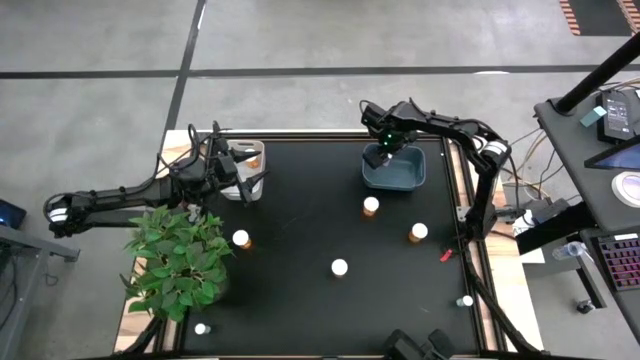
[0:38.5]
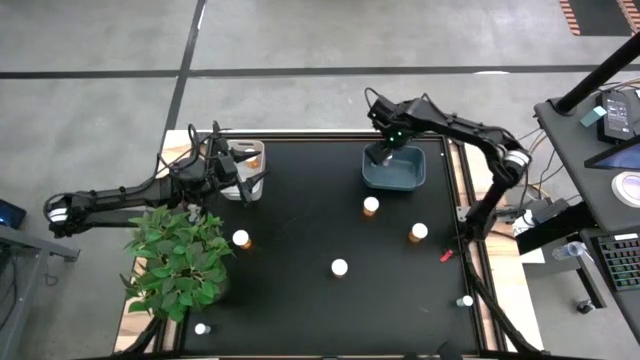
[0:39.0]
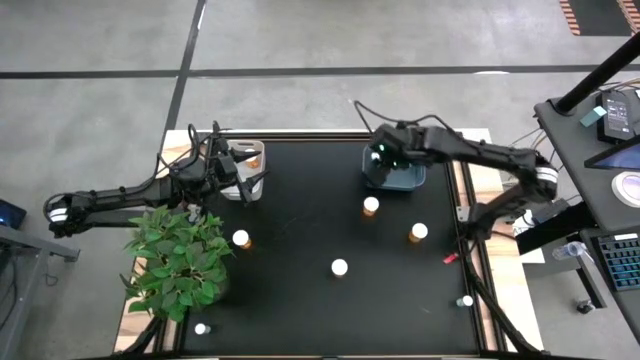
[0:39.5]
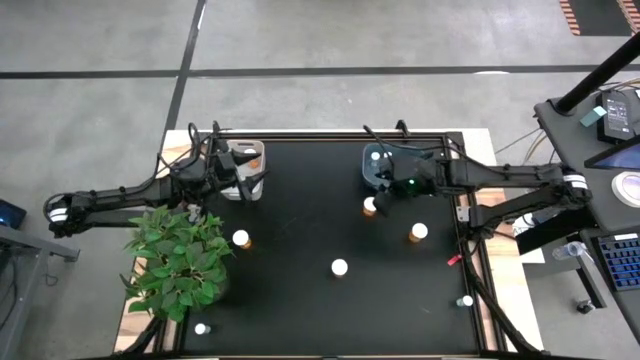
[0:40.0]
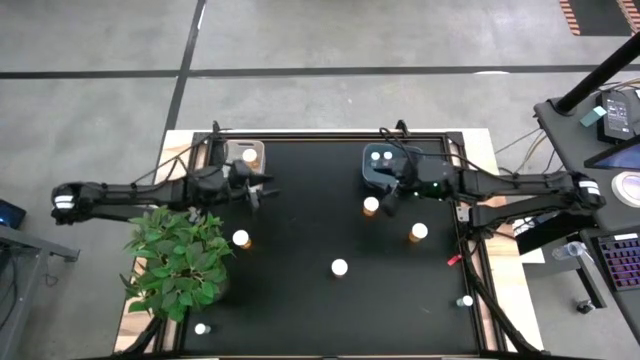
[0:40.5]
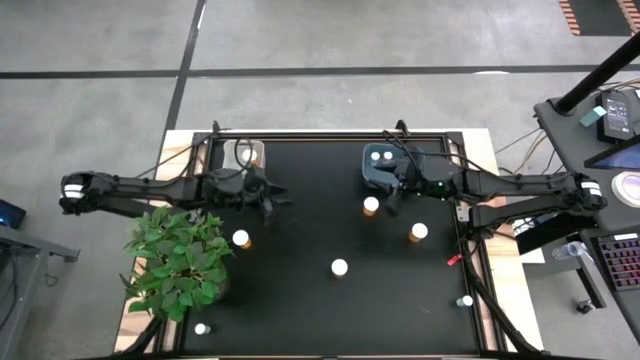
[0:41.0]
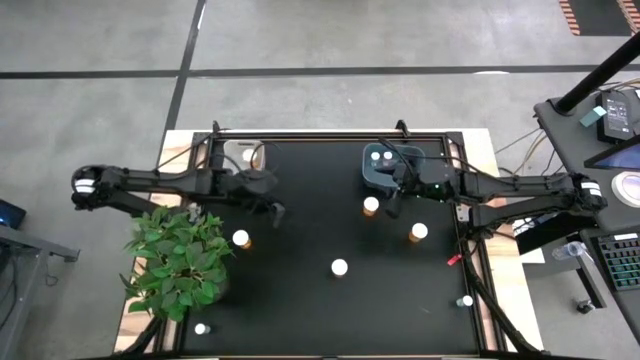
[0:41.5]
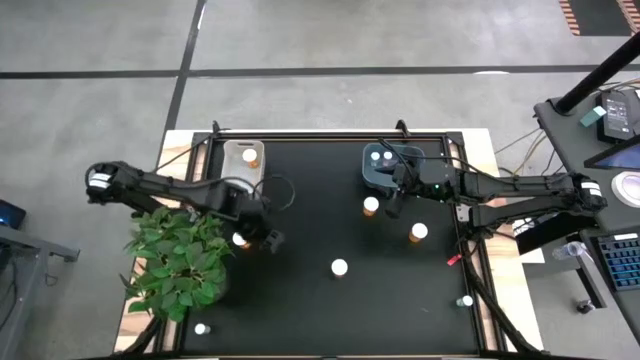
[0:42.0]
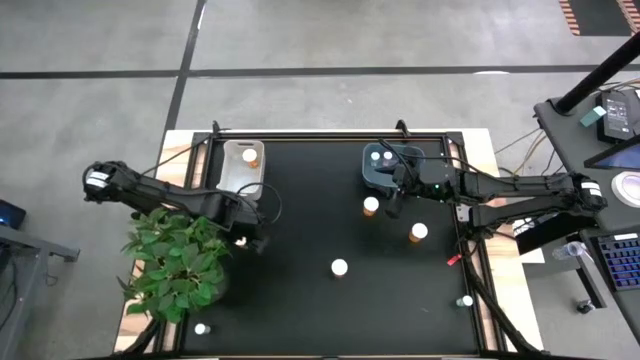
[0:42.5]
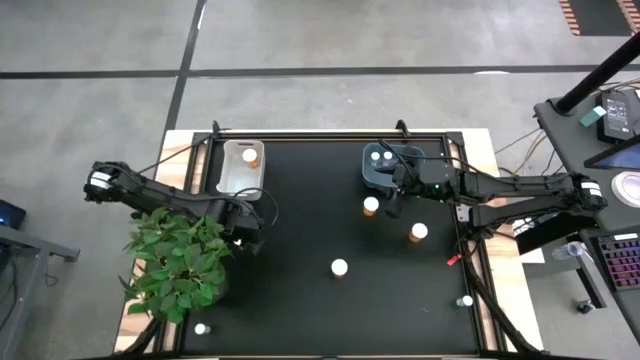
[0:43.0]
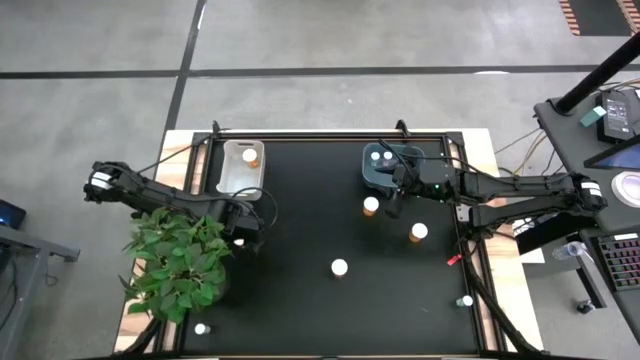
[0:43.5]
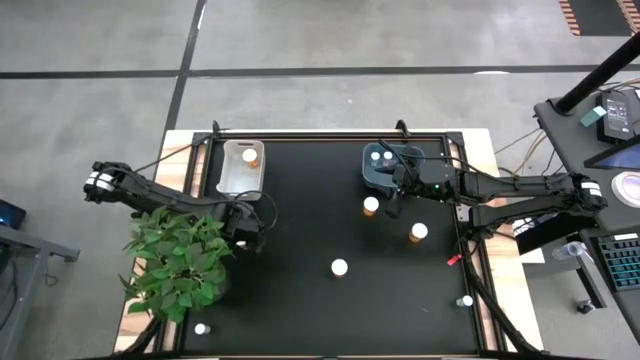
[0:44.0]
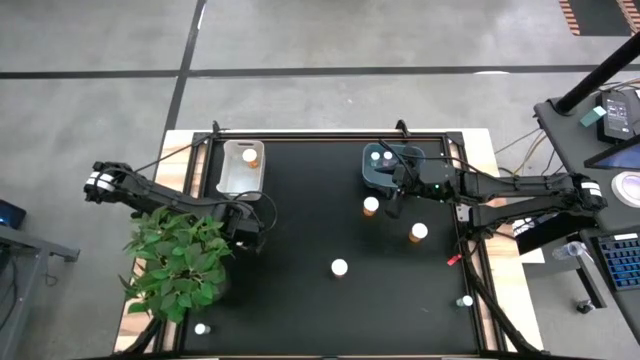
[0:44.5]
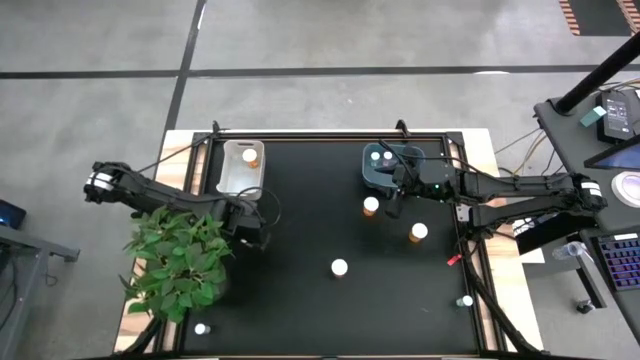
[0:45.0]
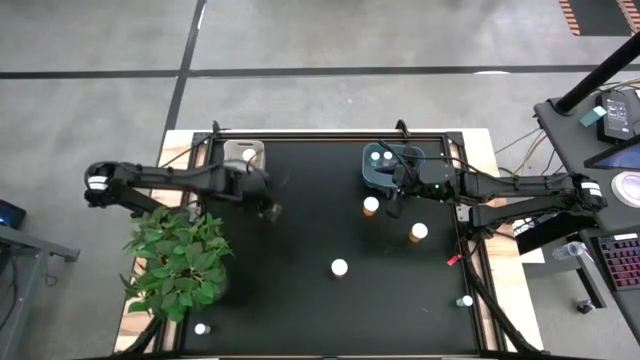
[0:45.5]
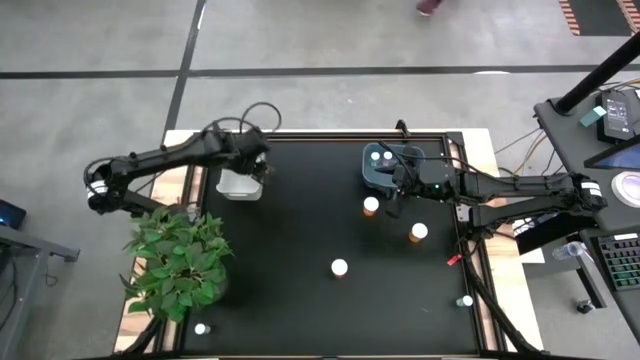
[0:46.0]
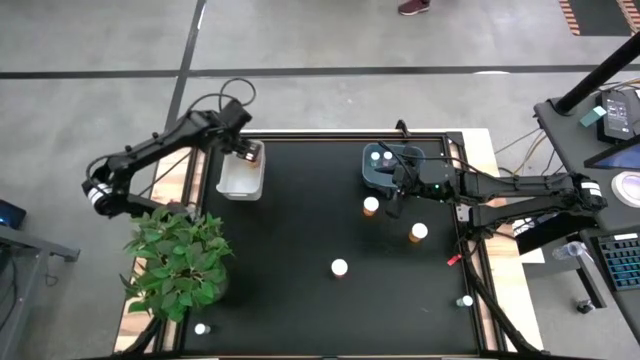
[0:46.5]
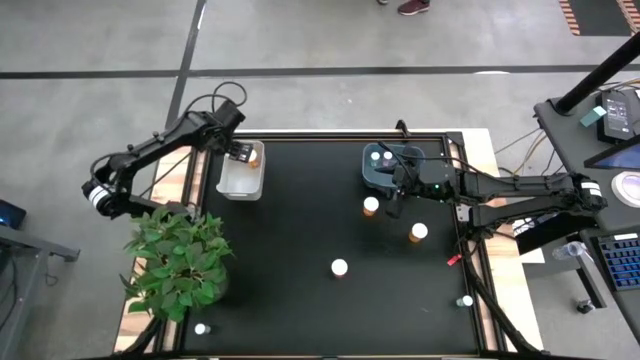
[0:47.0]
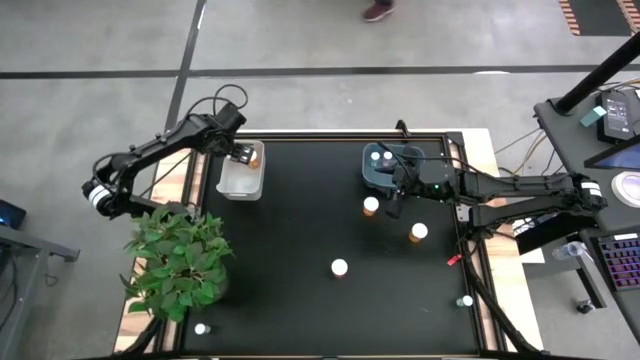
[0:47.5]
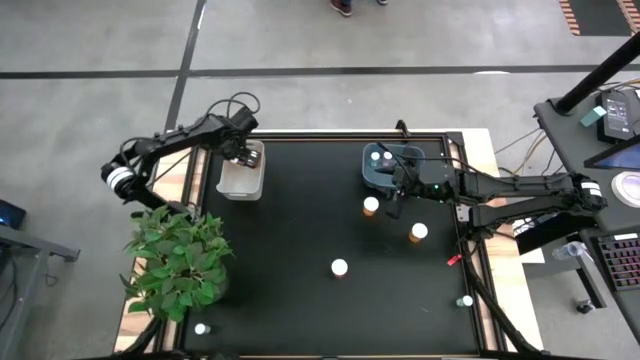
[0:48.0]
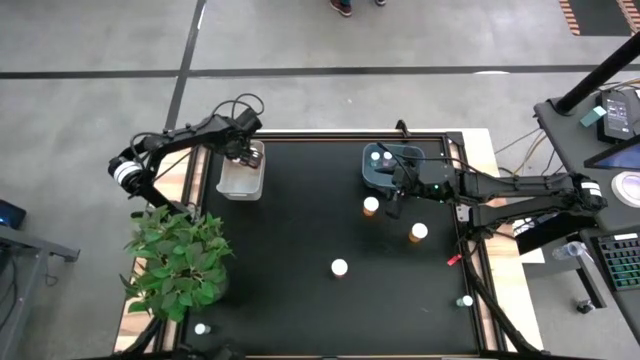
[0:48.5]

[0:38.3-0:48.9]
Task: Pick and place medicine bottles into bin by pill shape (circle, oval)
Put the big orange pill bottle into the white bin

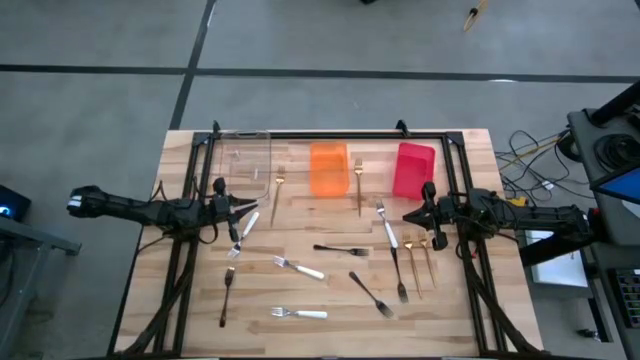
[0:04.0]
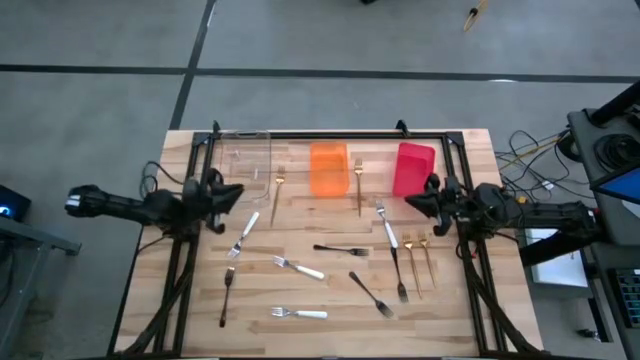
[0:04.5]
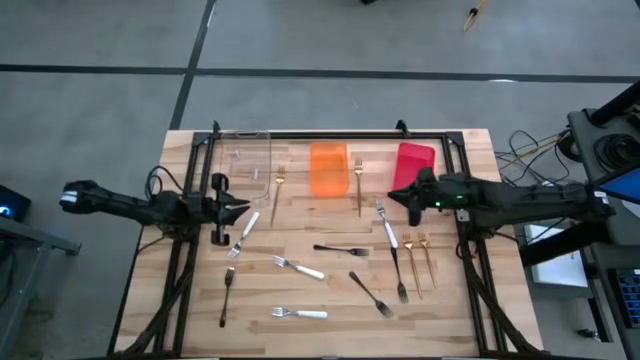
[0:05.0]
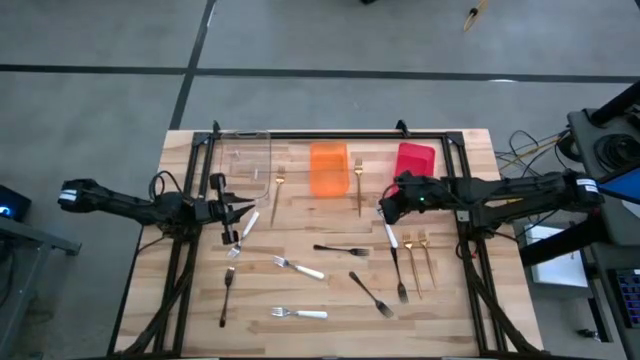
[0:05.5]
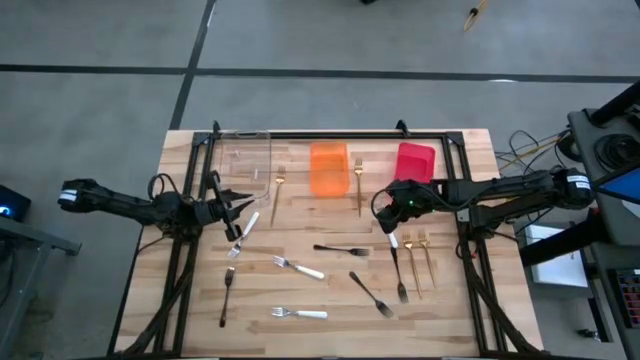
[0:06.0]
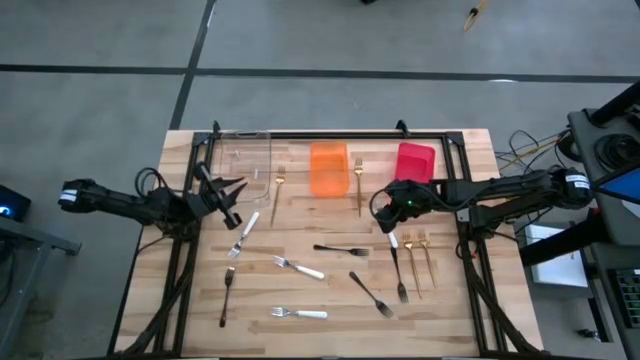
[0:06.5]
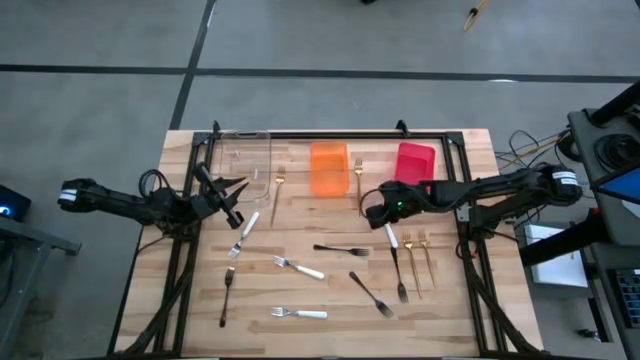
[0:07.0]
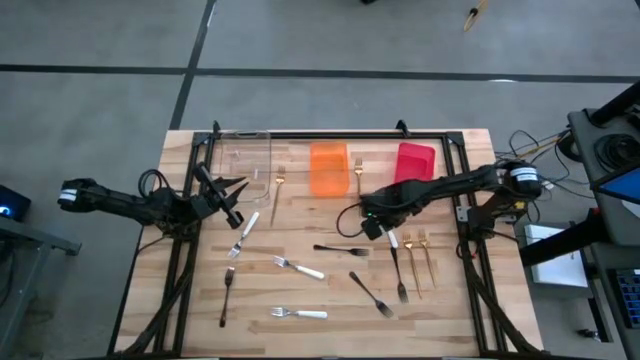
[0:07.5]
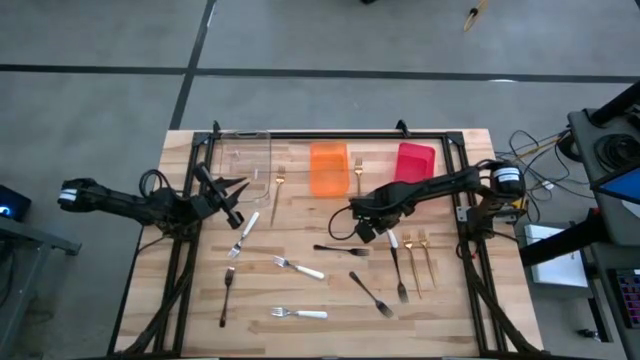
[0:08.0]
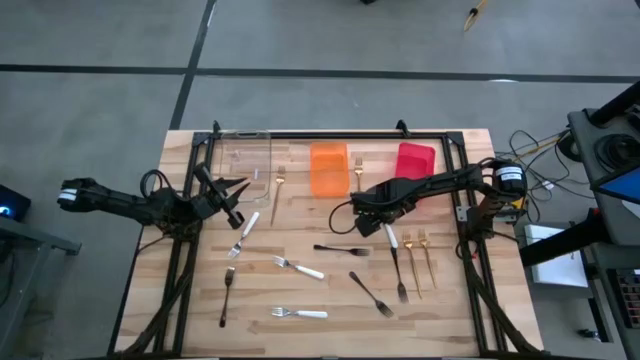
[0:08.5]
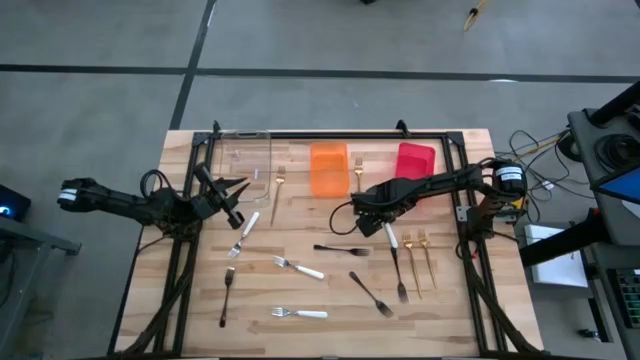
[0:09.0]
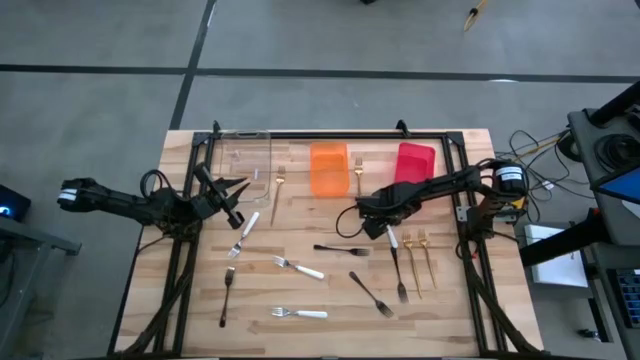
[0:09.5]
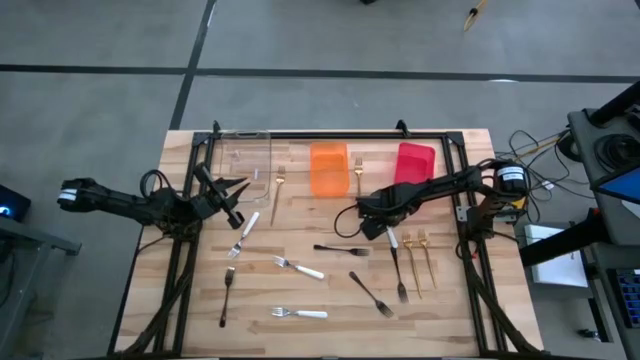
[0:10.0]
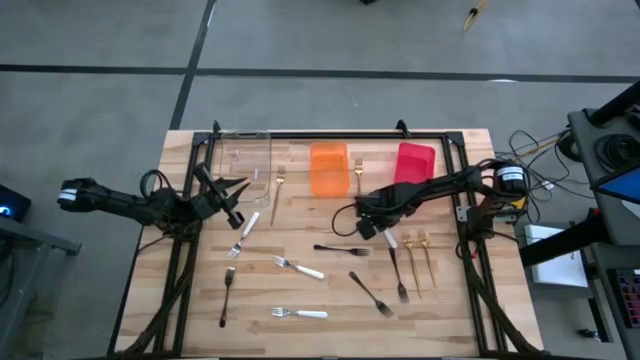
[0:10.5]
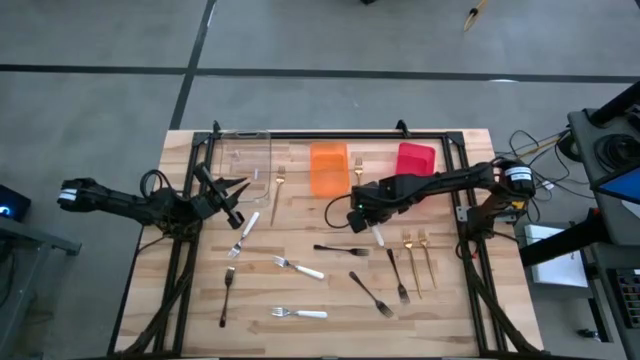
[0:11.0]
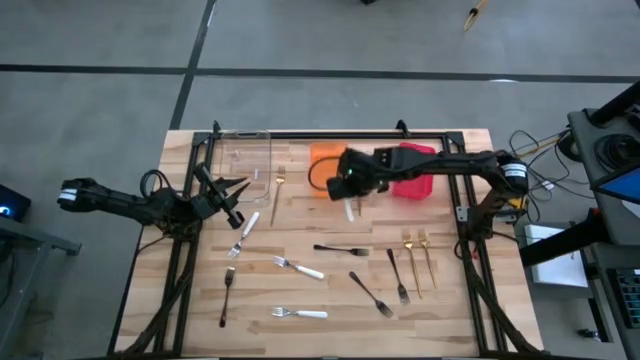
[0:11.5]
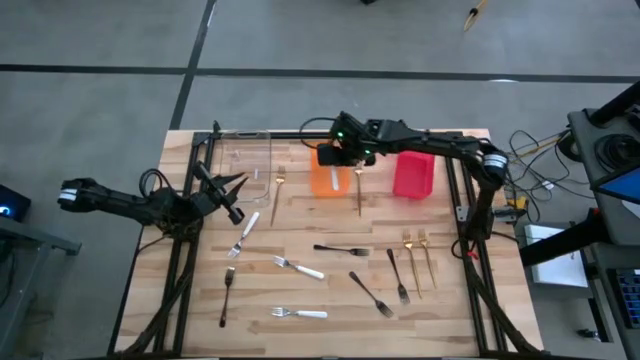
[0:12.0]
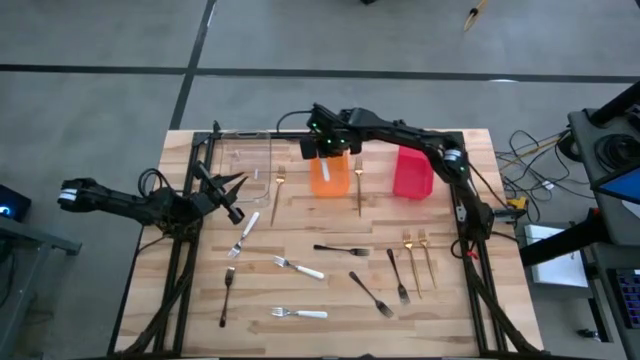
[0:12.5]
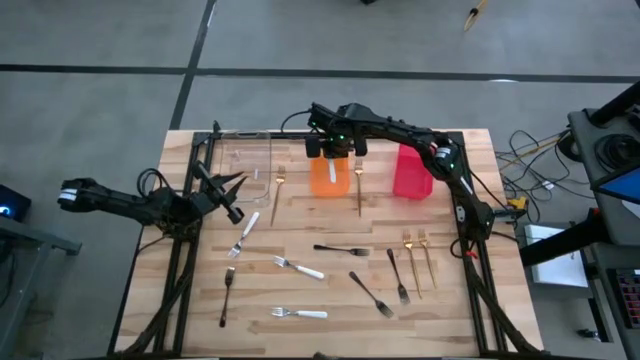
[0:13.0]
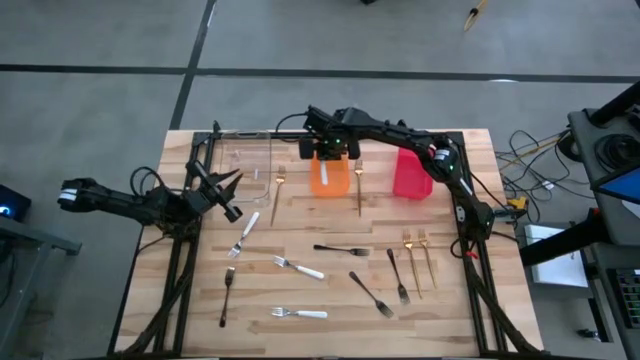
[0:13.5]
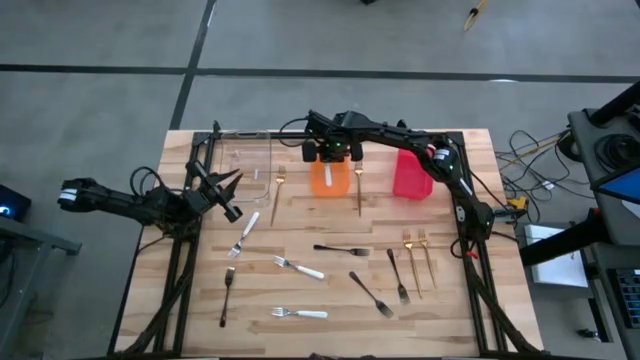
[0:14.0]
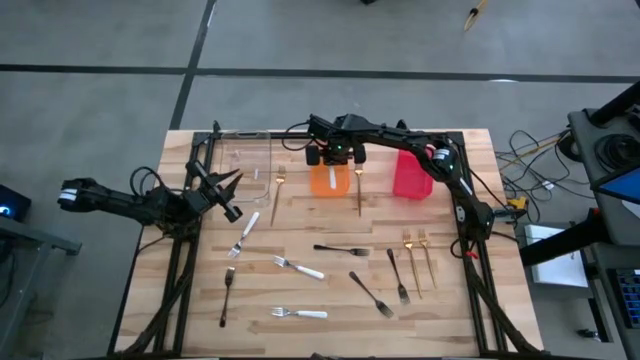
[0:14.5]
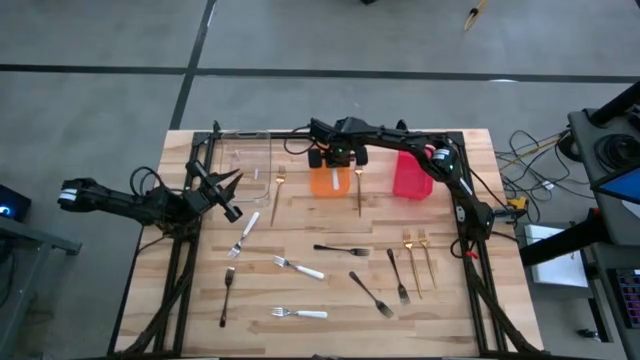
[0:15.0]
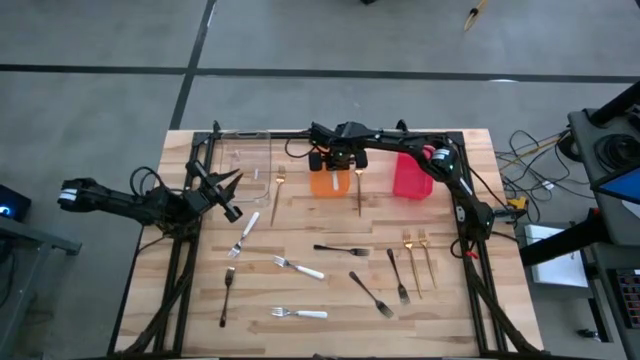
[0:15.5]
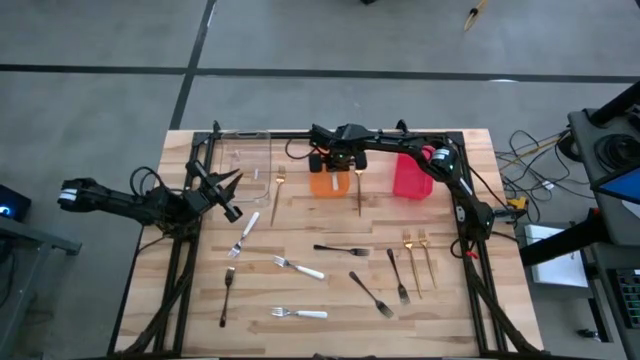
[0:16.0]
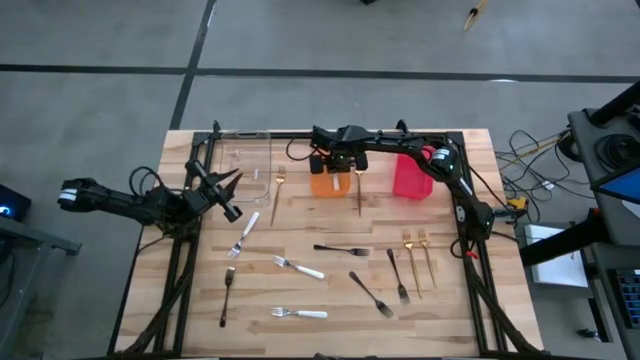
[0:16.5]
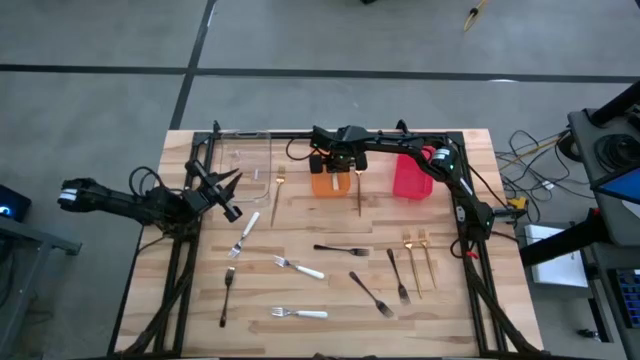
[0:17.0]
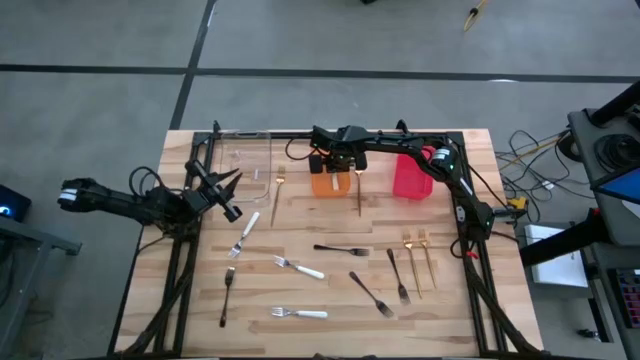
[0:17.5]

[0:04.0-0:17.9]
Task: Sort silverware by color (type)
Put the top right white fork into the orange bin
